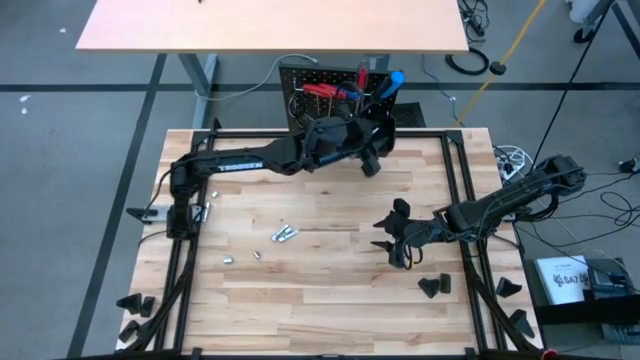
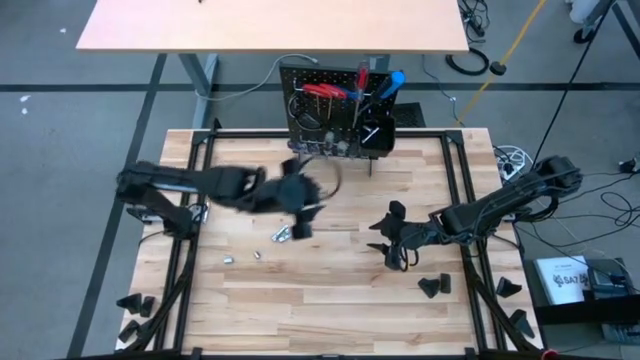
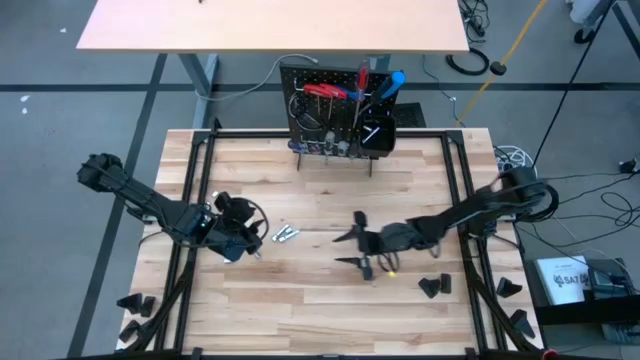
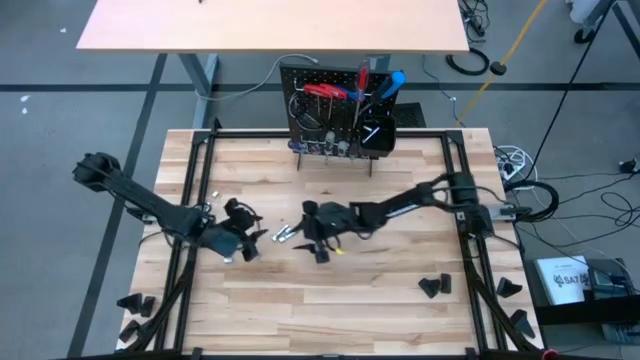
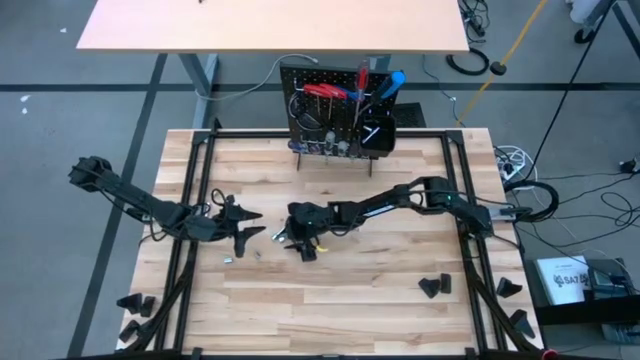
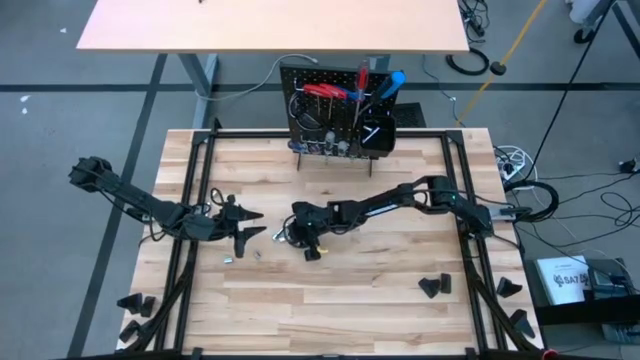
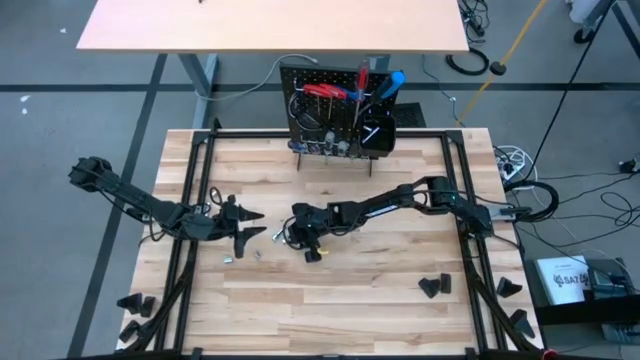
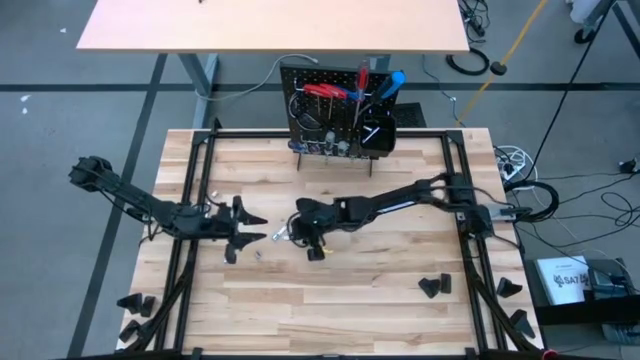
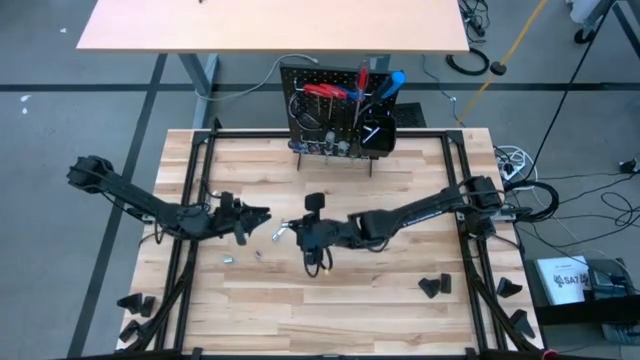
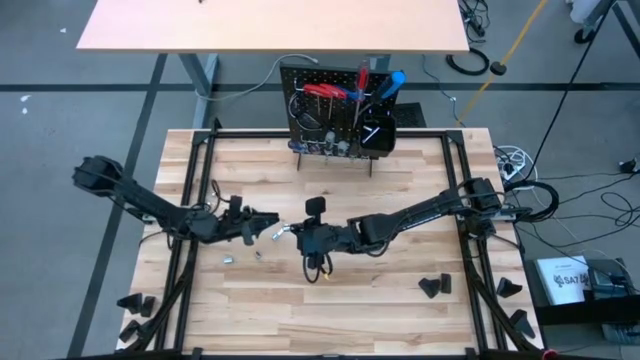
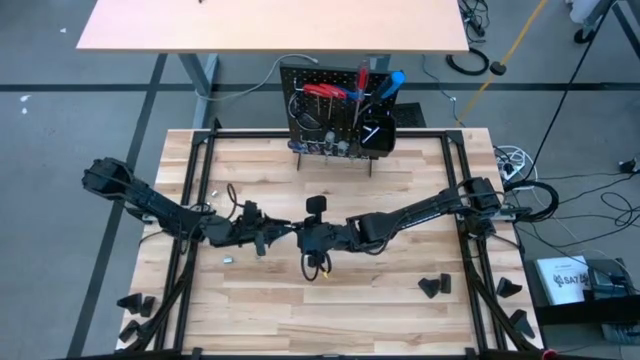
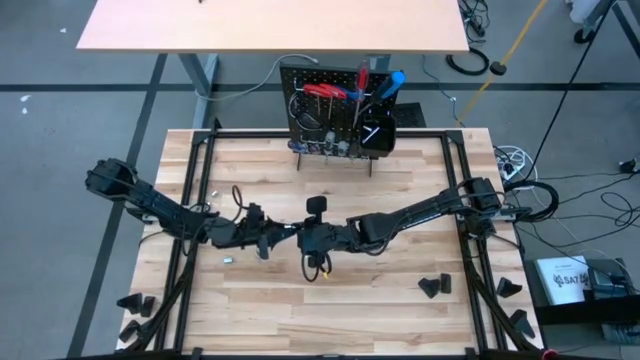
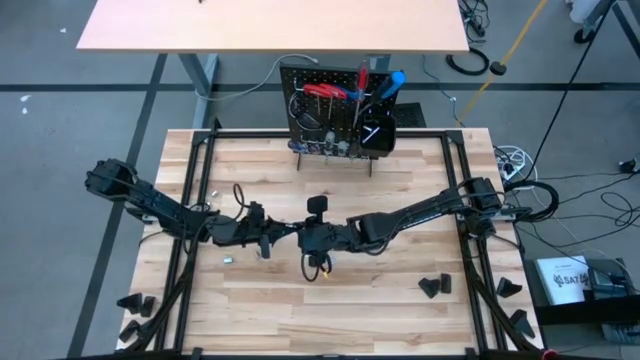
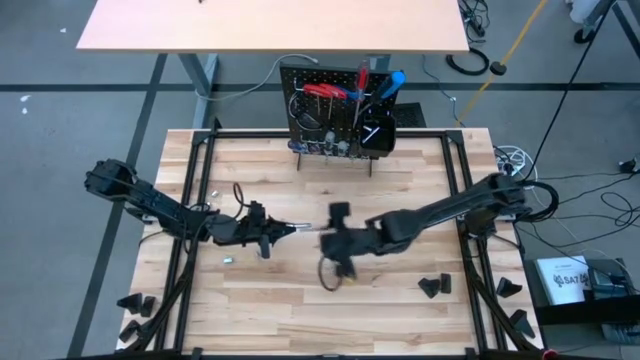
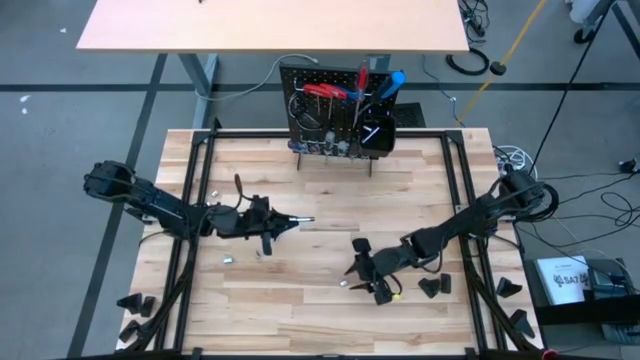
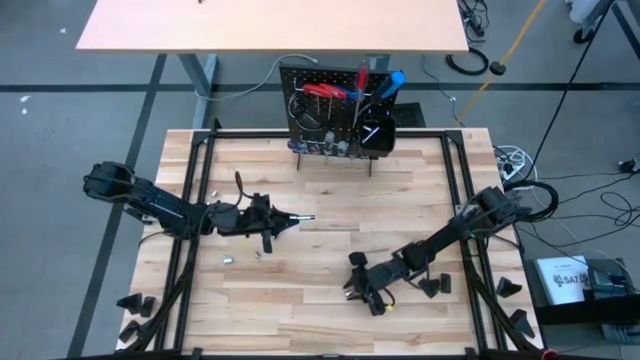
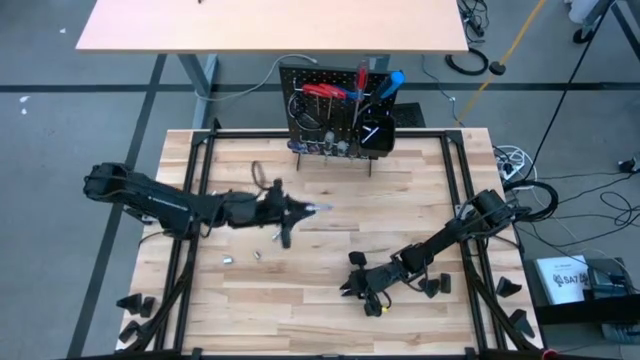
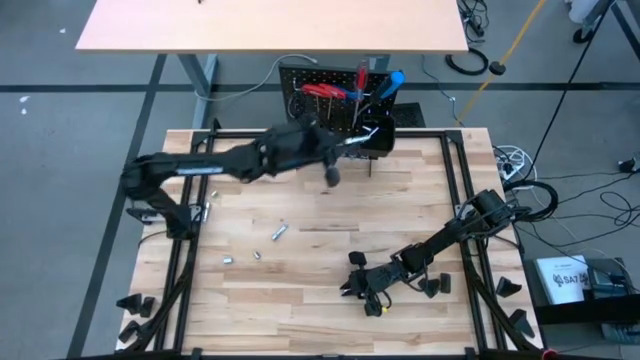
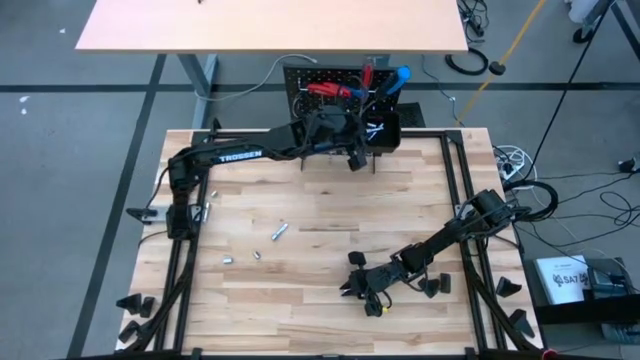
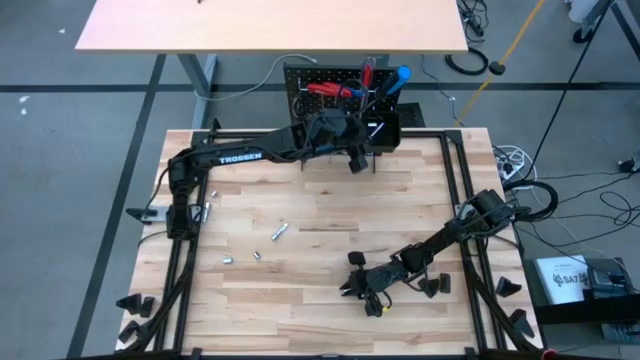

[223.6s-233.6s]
Task: Hang tools onto peg board
Put the silver extension bar into the black bin on the peg board

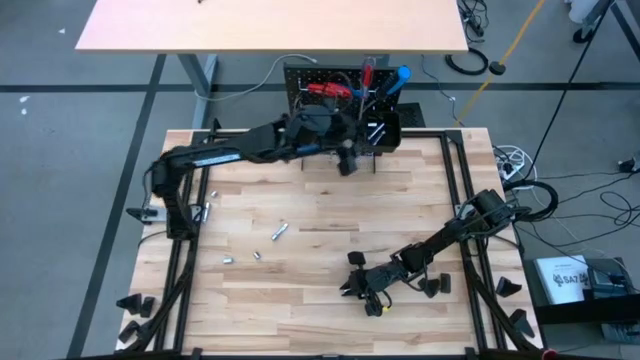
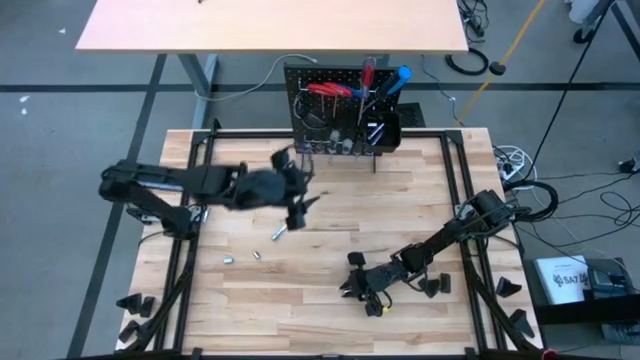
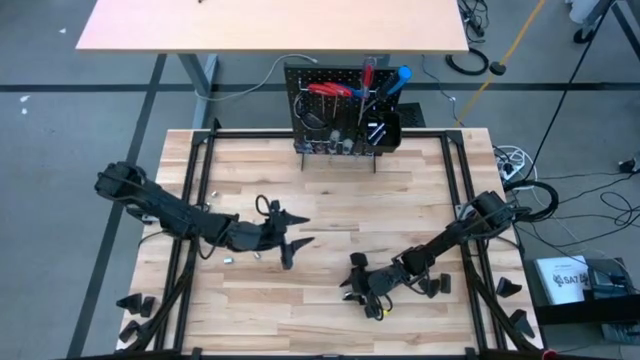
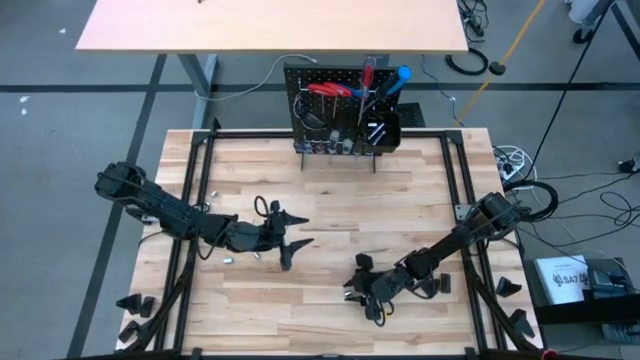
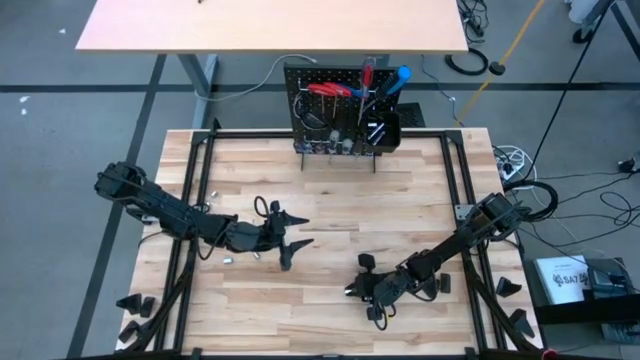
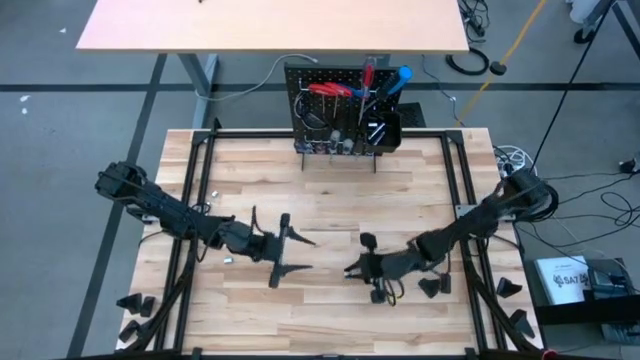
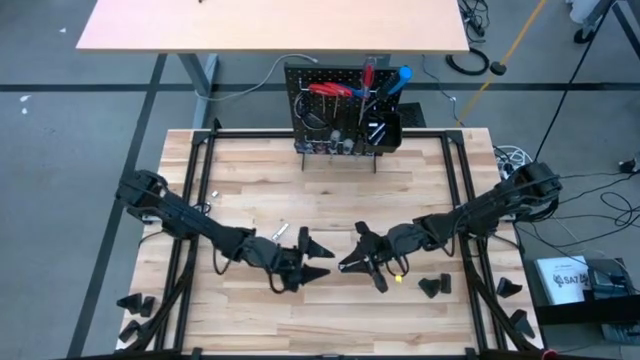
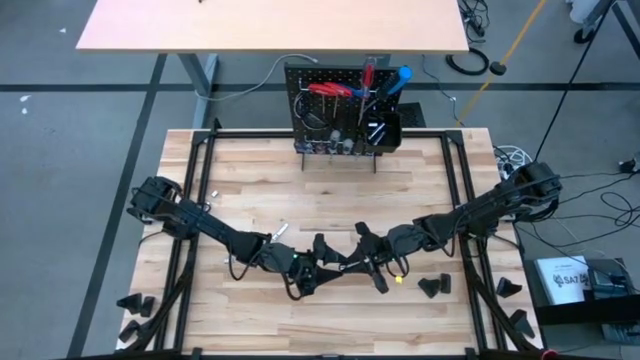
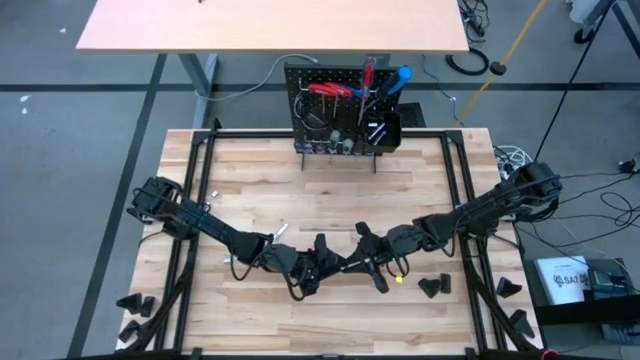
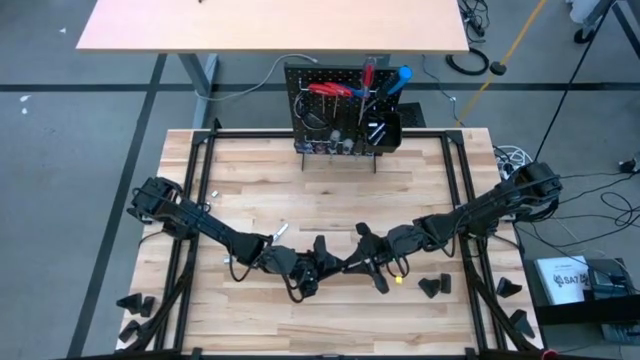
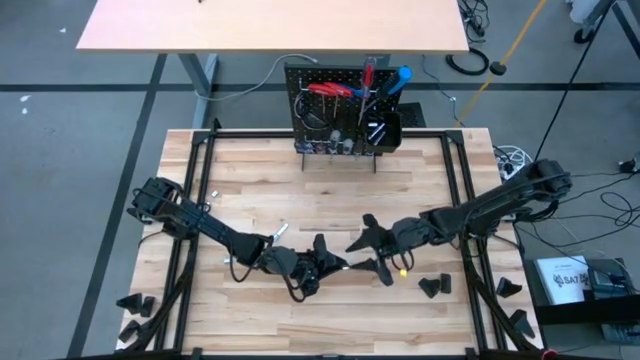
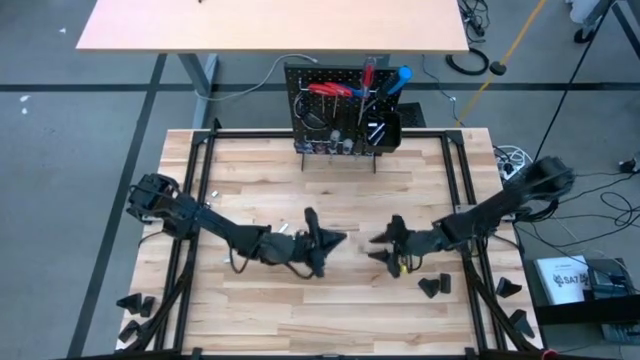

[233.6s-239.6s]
Put the silver socket into the black bin on the peg board

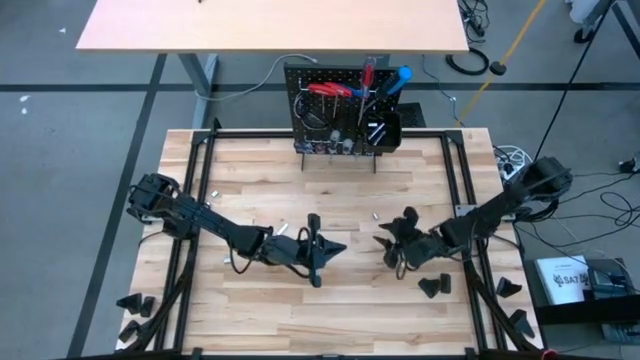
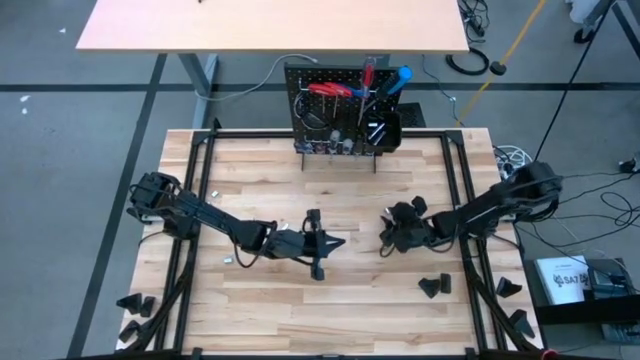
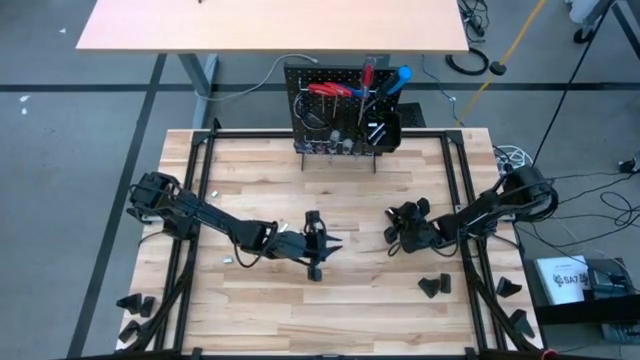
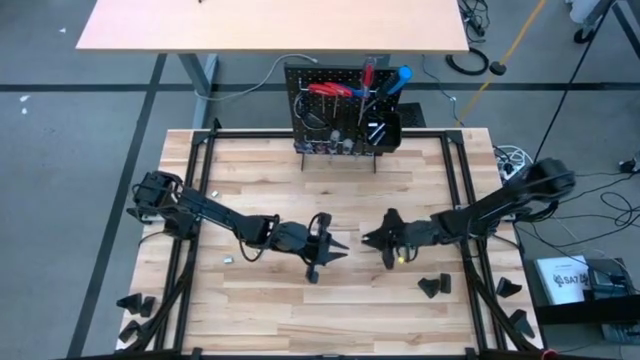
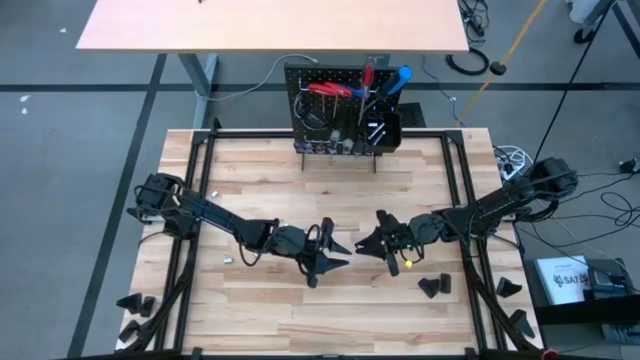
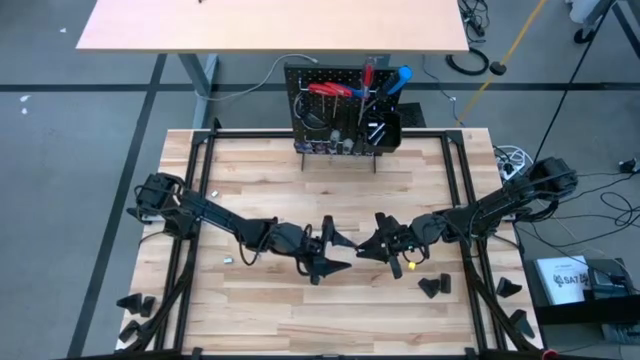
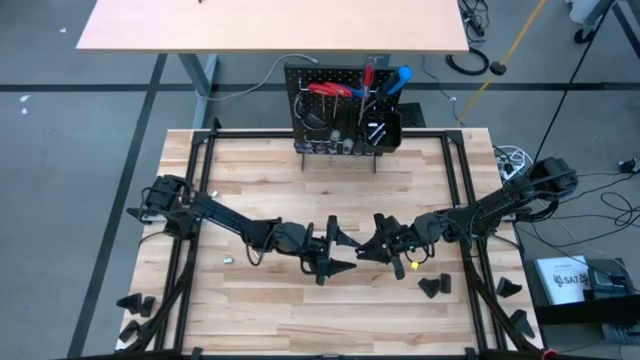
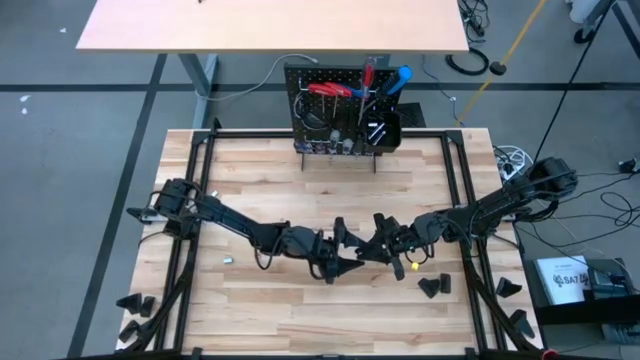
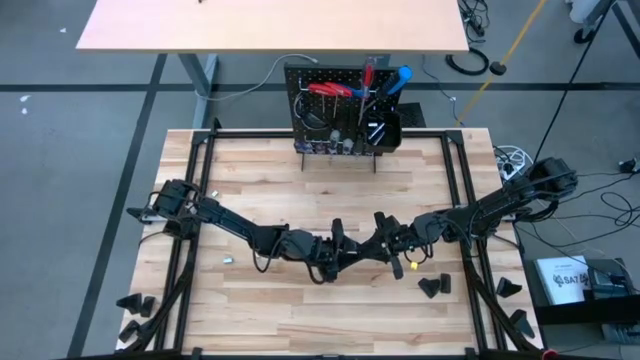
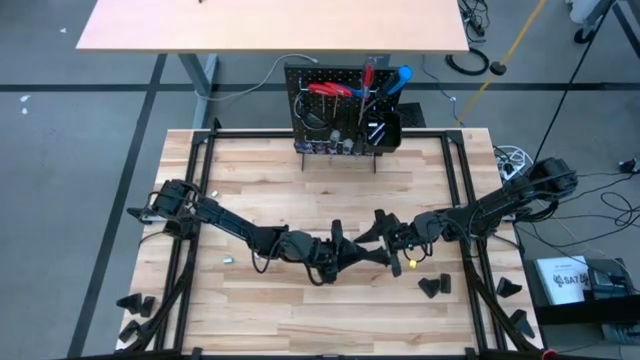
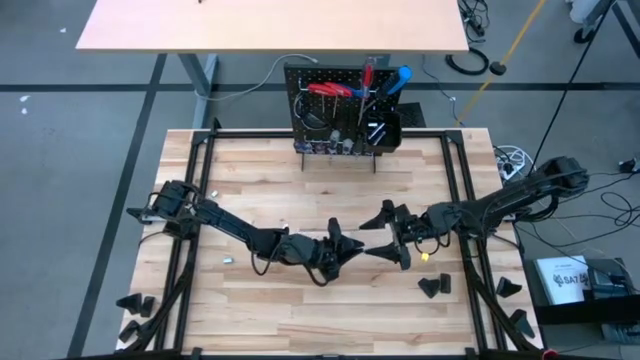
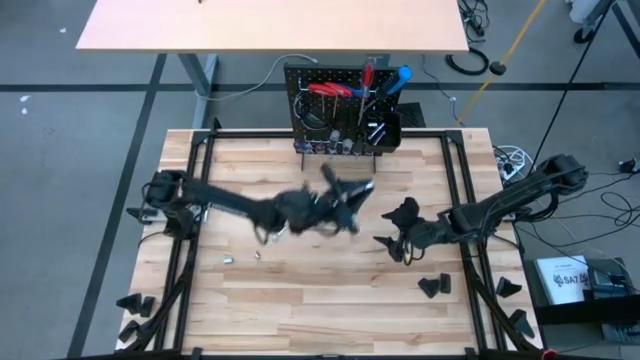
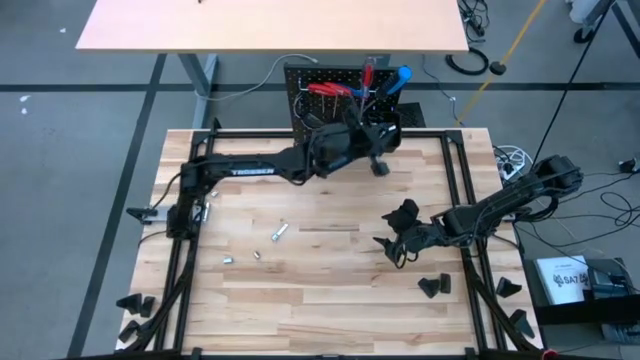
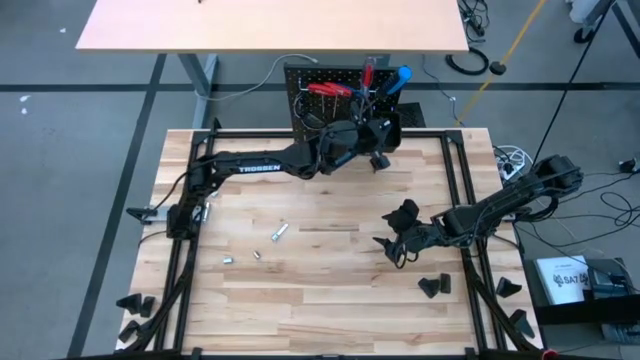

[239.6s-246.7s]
Put the silver socket into the black bin on the peg board
